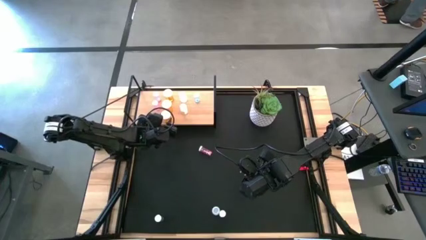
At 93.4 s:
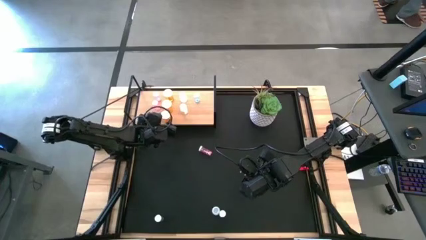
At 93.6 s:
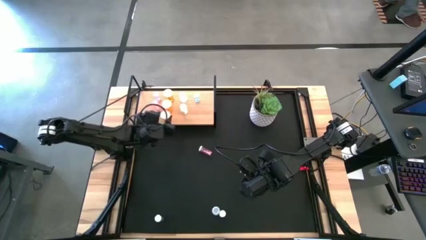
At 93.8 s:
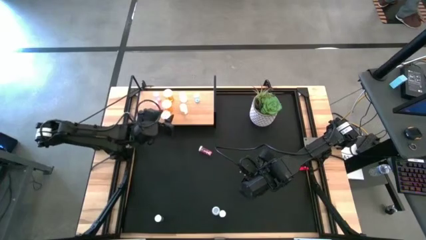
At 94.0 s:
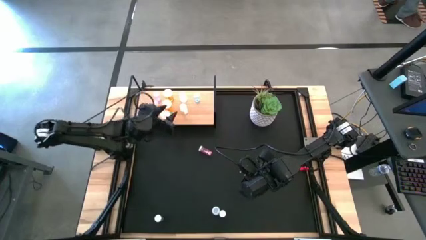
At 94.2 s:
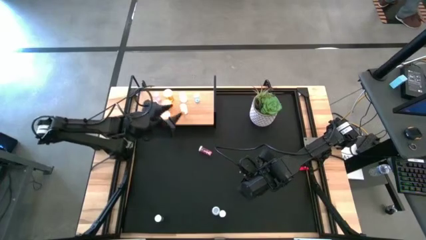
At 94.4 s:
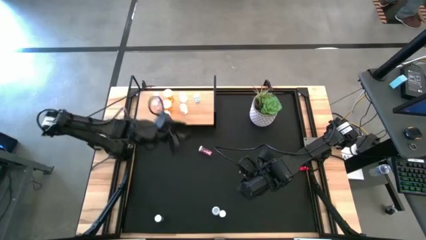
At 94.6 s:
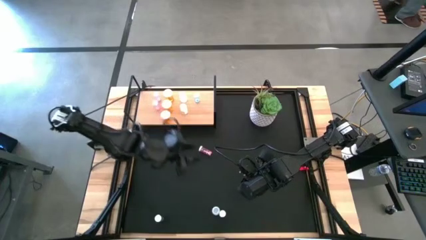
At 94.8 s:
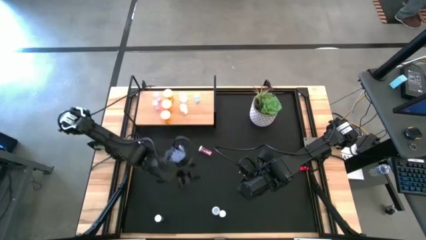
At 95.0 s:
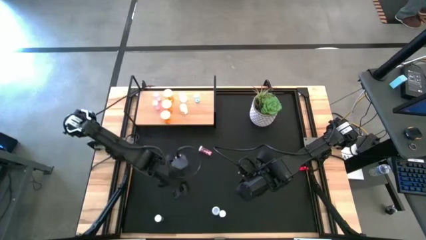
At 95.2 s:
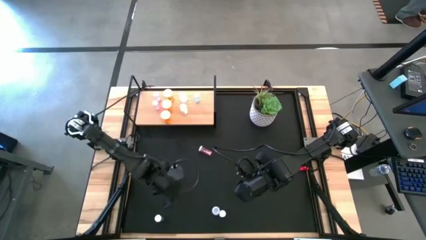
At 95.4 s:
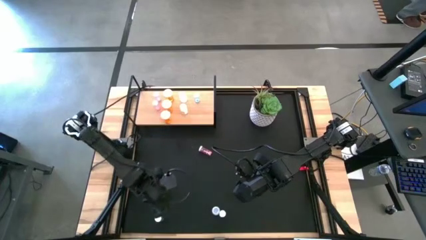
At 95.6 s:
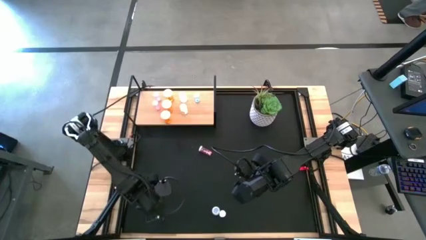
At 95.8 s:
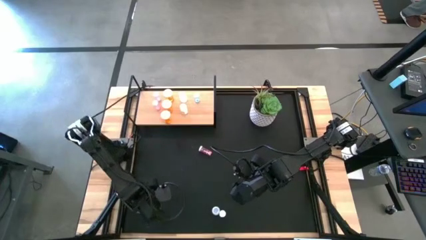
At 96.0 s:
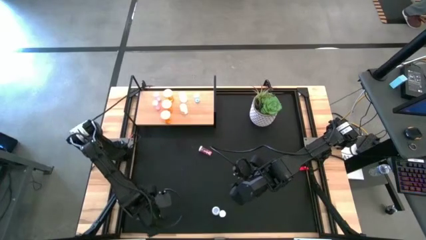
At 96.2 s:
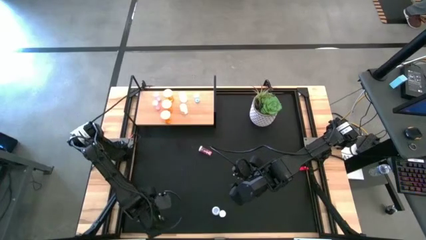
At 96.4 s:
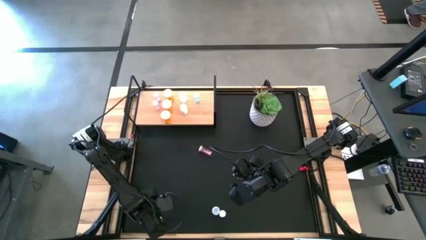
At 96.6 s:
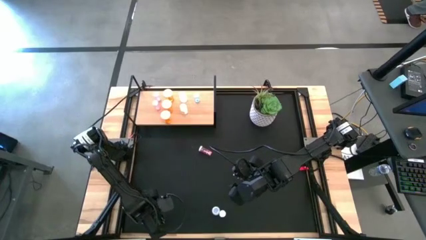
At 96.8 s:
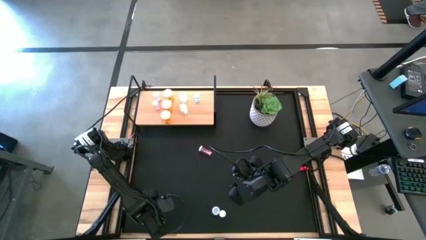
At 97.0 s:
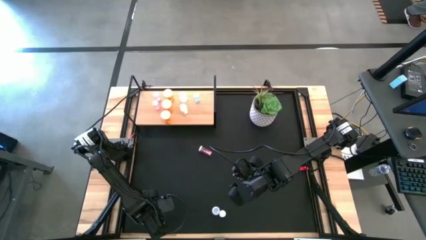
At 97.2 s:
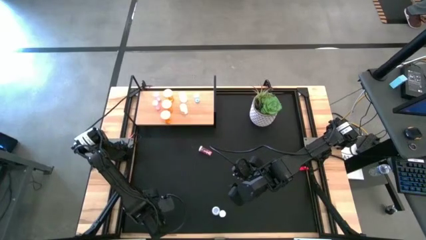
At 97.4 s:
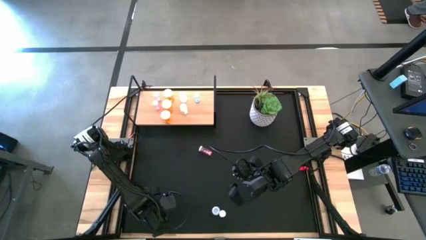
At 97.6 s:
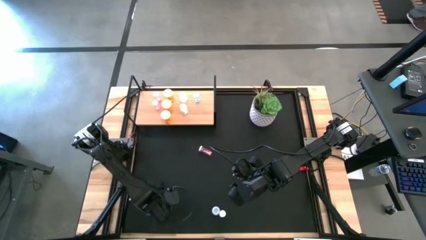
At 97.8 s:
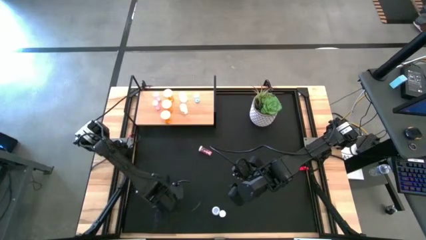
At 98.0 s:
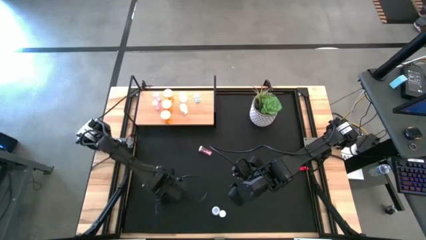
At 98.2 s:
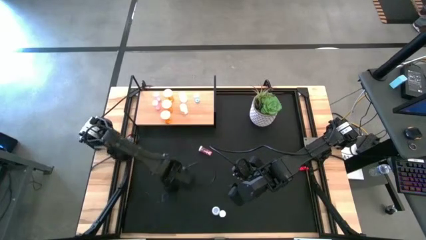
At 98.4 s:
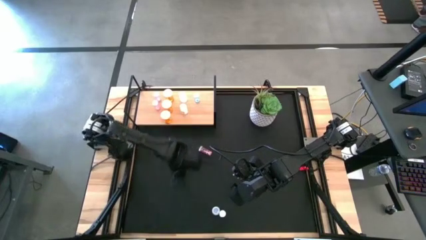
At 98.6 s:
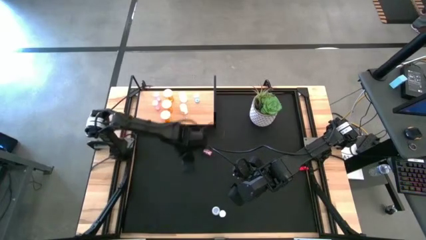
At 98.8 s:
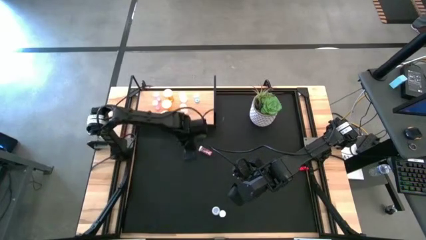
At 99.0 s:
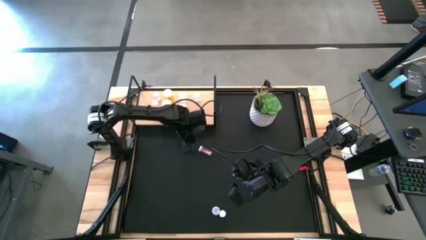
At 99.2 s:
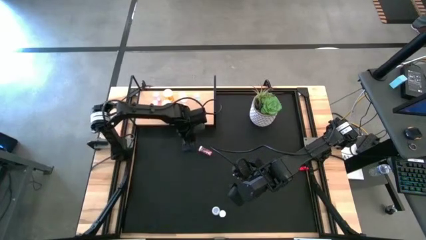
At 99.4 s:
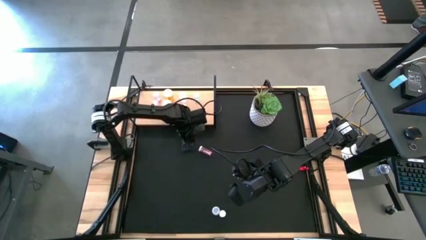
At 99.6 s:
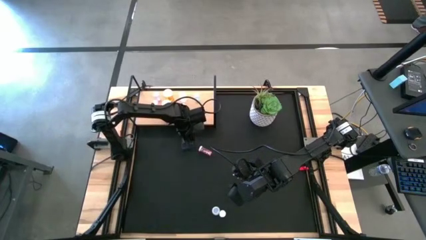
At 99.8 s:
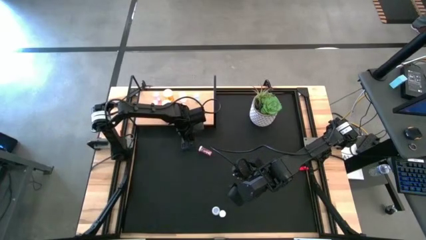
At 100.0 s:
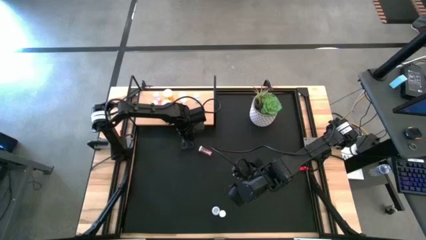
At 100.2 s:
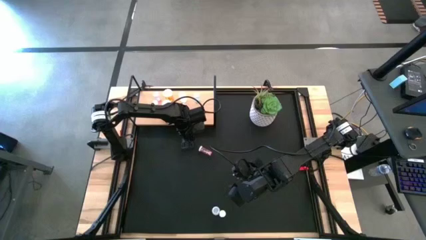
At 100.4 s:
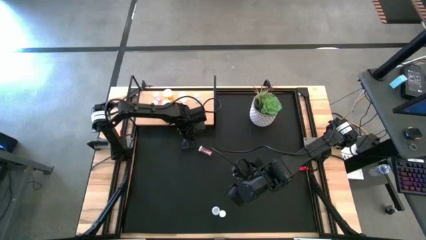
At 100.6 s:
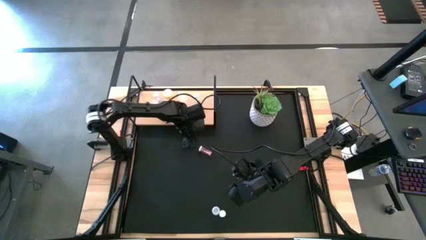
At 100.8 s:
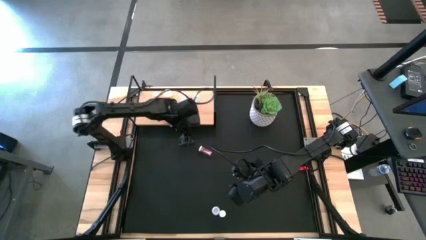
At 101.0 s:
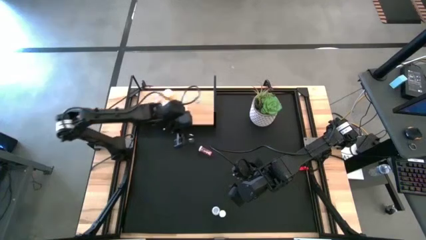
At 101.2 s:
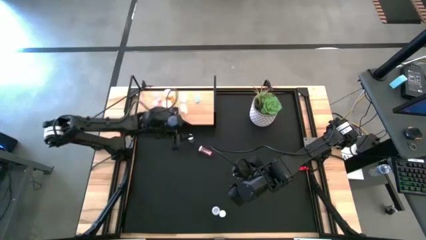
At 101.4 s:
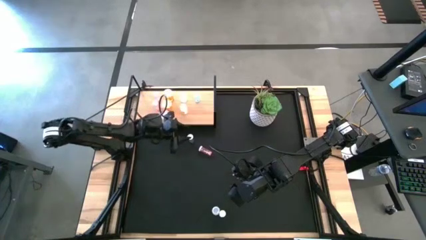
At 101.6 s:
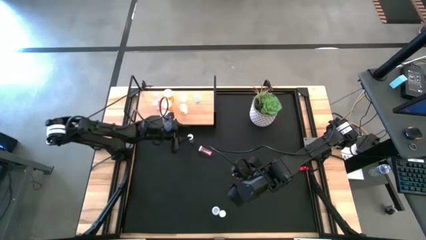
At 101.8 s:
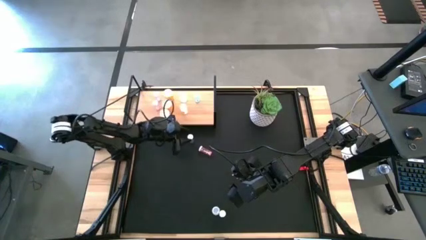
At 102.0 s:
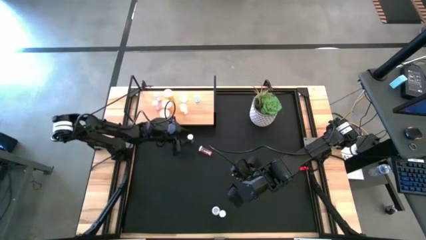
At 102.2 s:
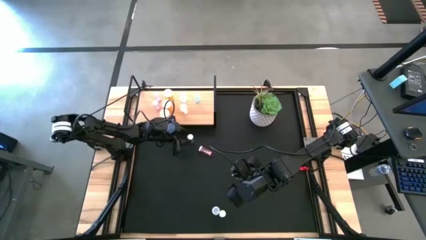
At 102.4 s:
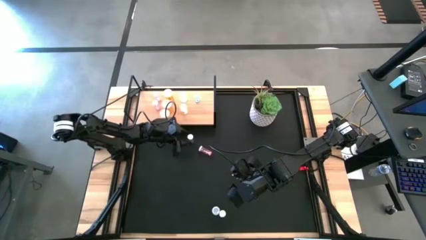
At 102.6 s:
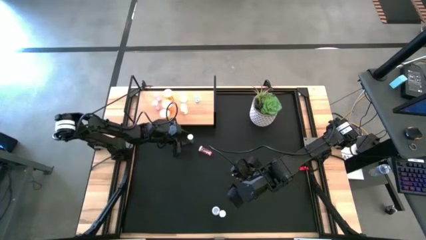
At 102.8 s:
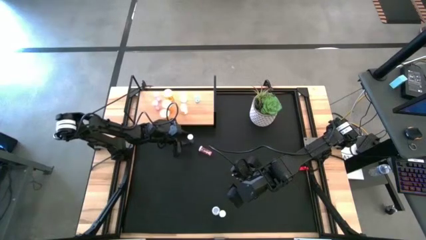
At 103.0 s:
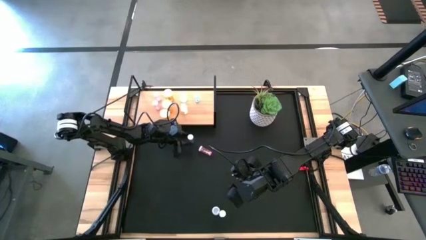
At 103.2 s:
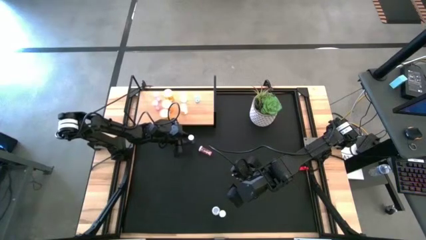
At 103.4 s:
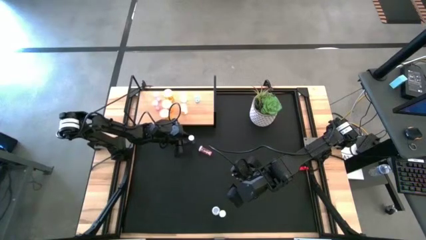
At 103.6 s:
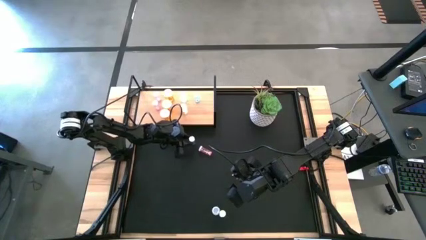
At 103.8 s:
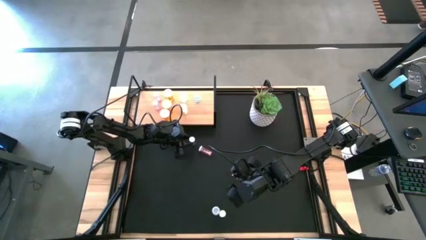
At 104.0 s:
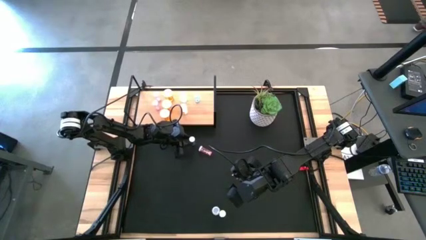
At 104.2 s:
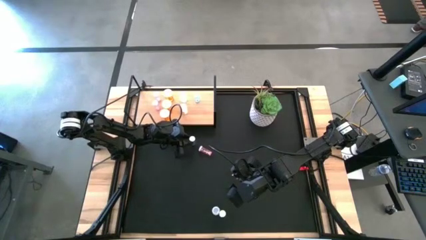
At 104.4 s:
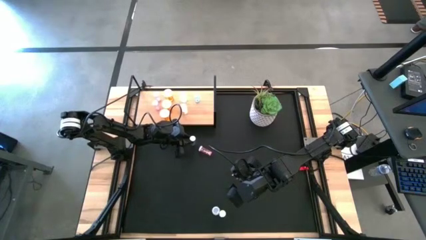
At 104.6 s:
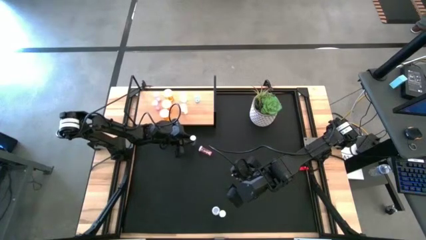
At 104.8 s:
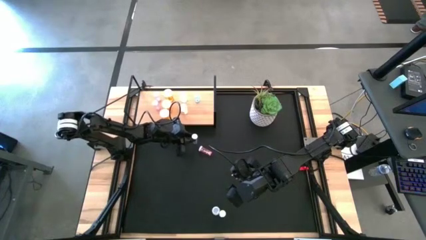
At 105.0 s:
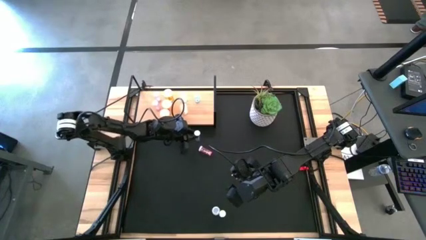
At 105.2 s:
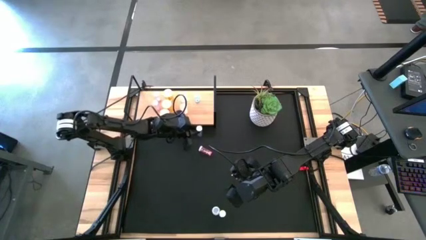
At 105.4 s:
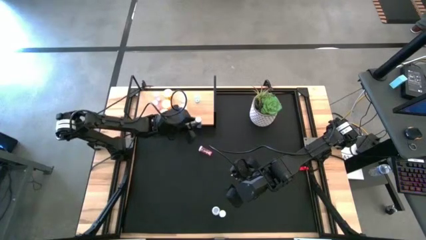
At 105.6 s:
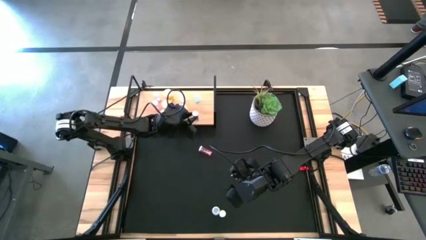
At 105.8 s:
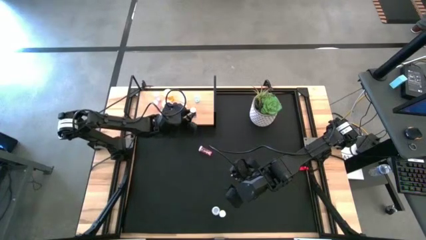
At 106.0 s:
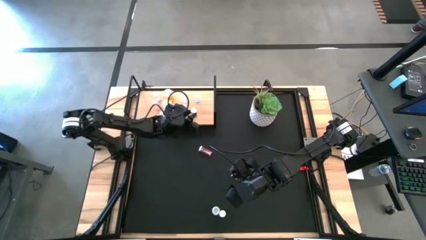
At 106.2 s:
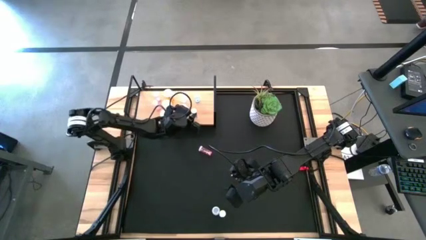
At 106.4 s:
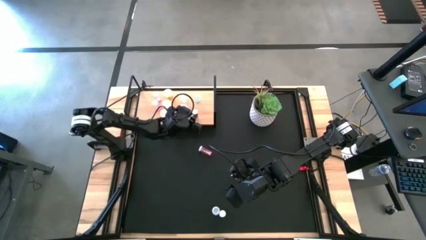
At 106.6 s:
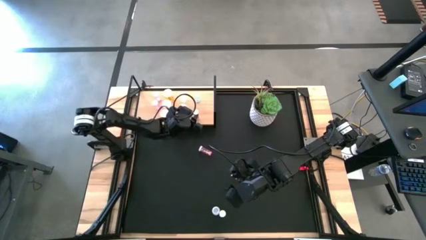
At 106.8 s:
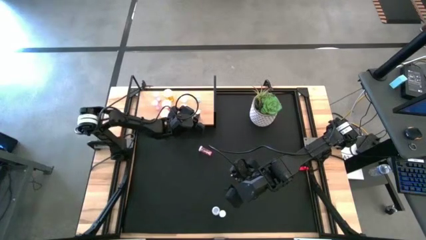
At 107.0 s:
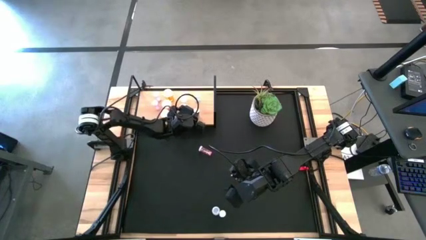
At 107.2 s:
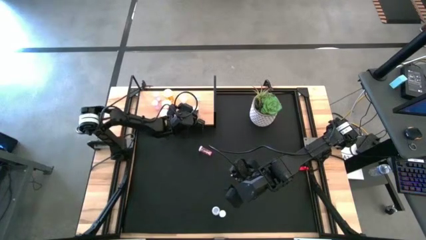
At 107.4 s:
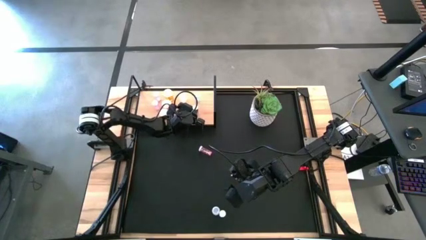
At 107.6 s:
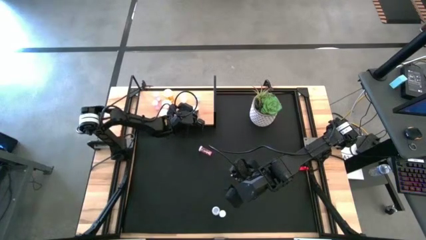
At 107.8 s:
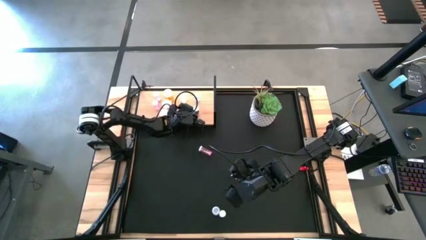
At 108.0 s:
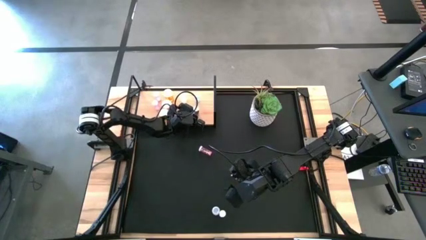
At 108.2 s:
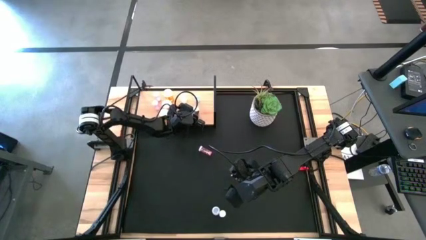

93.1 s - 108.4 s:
Task: Pick and place medicine bottles onto shelf by color
Put the bottom left blue pill bottle on the center of the table

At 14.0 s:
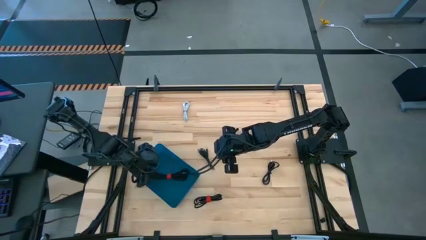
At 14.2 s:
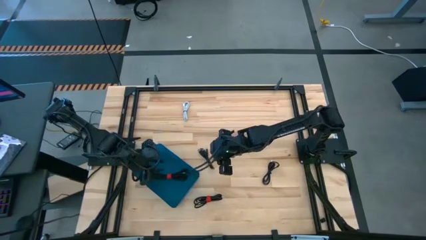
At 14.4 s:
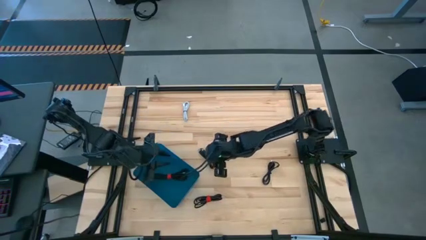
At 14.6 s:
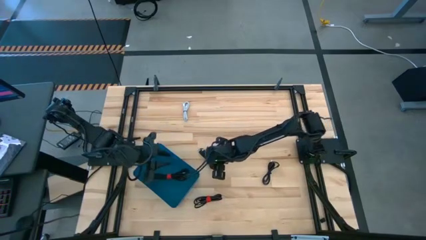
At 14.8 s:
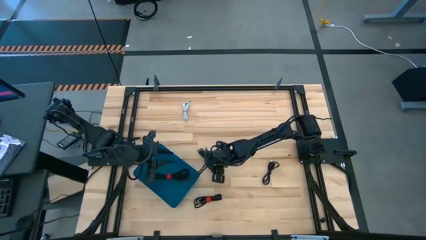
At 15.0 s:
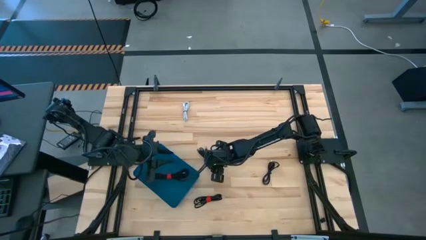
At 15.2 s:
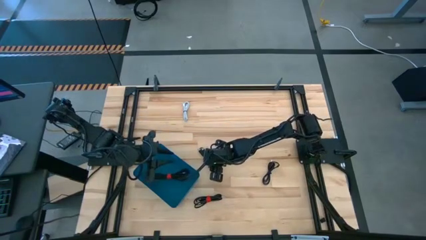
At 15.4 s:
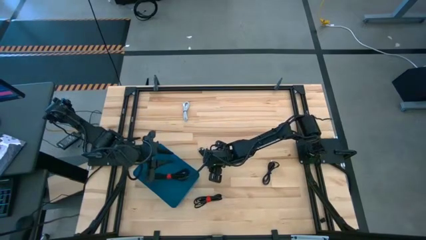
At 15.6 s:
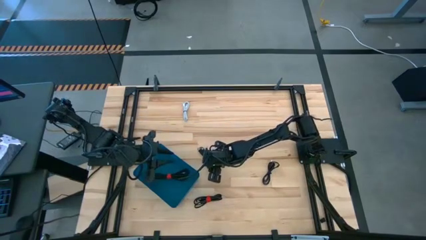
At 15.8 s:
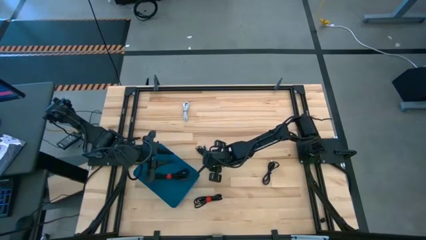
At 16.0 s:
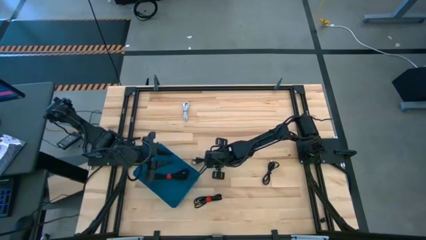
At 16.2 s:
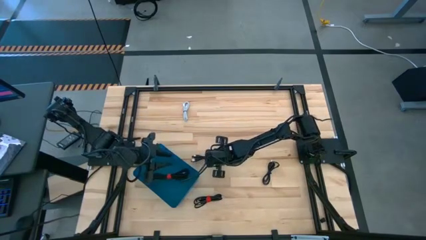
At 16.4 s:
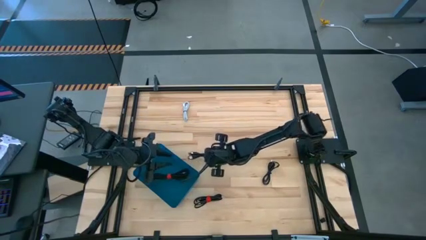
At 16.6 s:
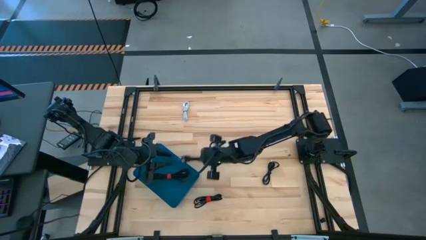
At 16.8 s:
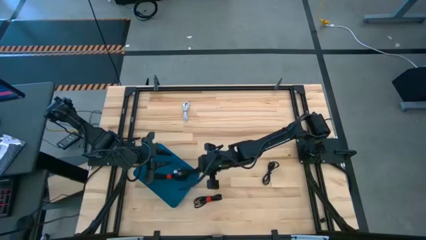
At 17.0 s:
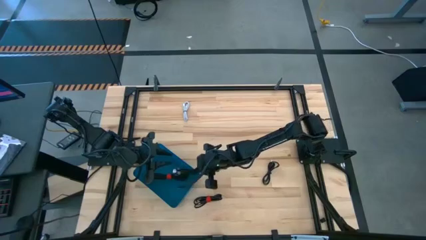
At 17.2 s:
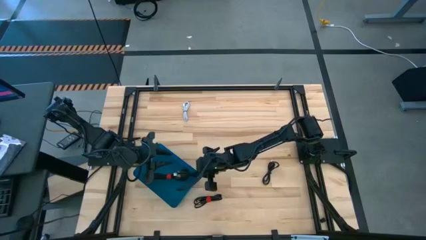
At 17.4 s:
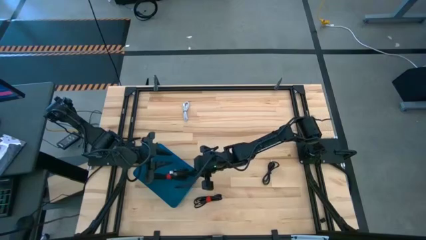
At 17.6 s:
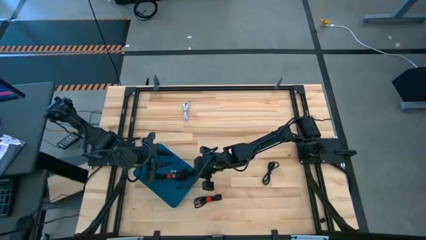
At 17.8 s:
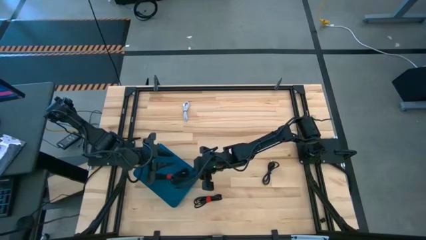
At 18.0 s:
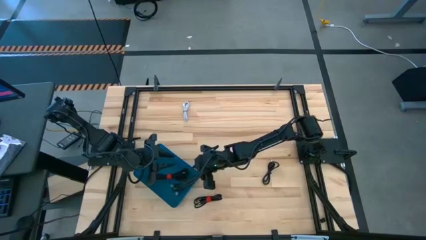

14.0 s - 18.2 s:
Task: Pick and place USB-C Cables
Put the black charger cable into the blue bin
